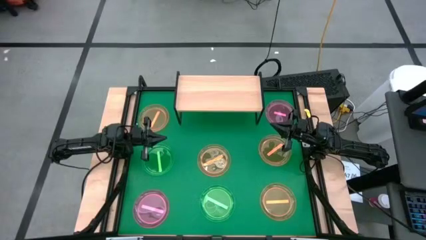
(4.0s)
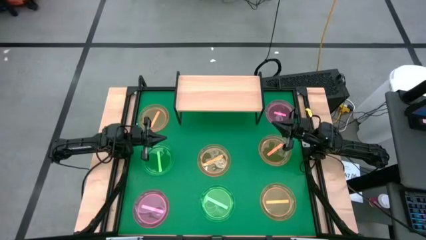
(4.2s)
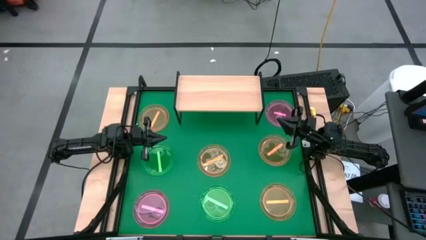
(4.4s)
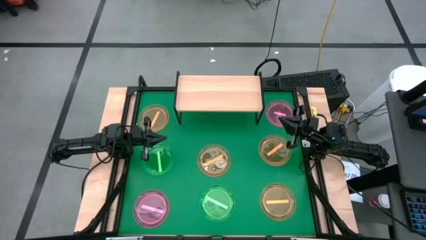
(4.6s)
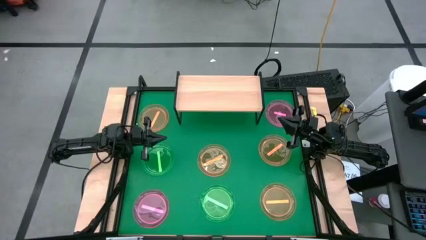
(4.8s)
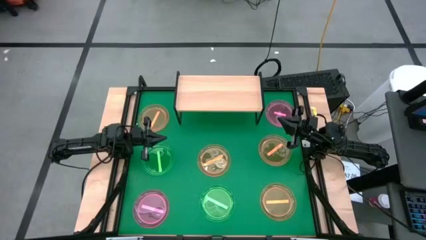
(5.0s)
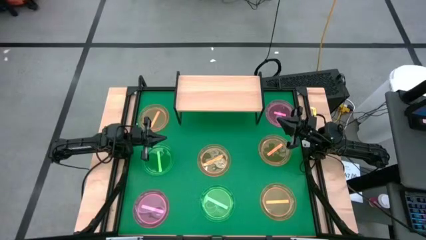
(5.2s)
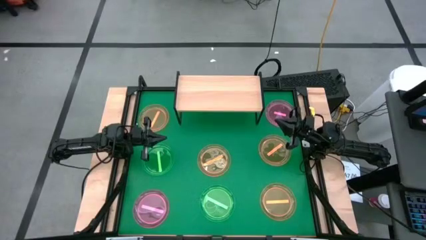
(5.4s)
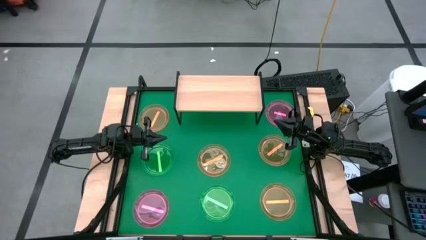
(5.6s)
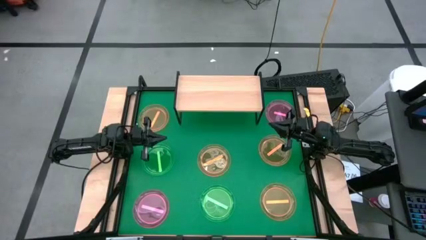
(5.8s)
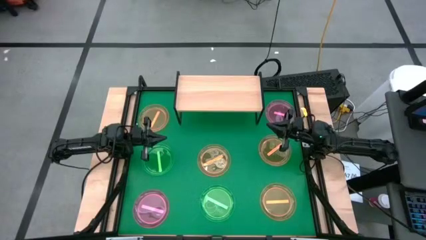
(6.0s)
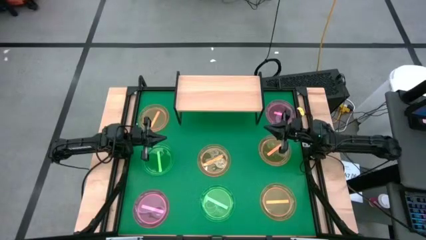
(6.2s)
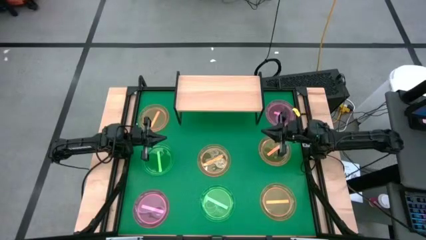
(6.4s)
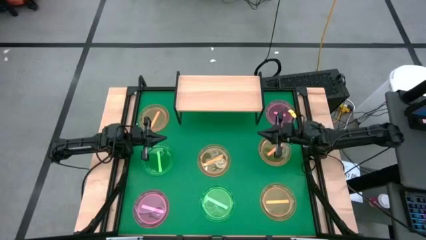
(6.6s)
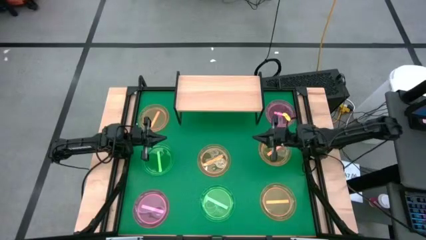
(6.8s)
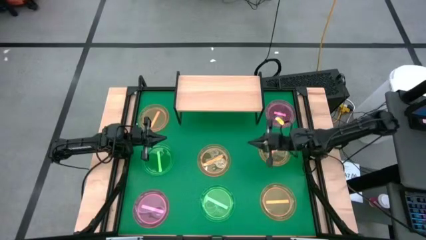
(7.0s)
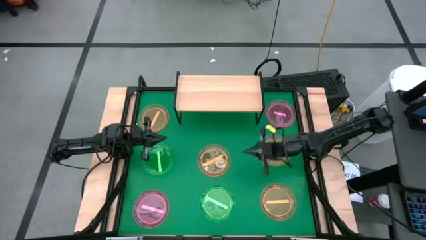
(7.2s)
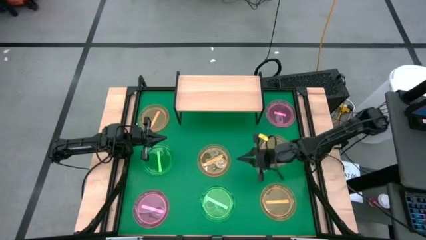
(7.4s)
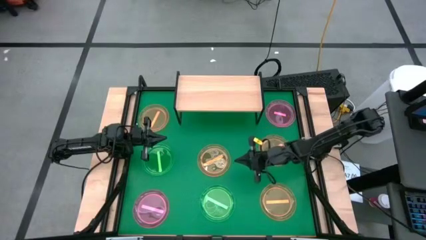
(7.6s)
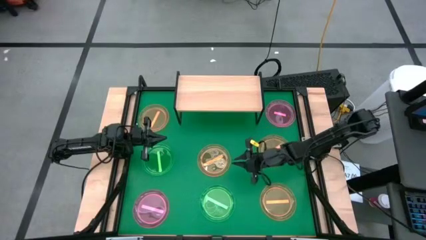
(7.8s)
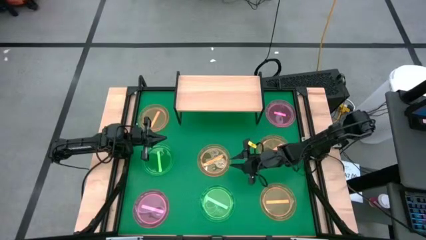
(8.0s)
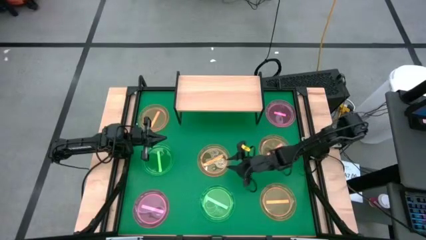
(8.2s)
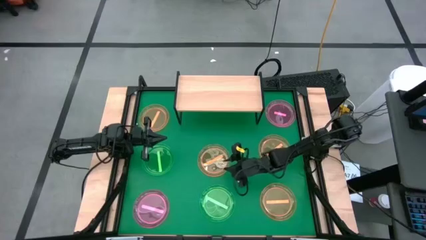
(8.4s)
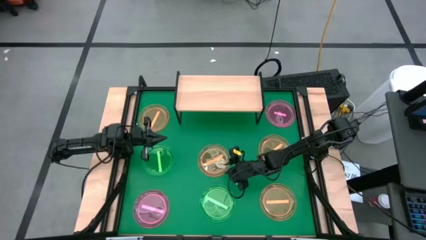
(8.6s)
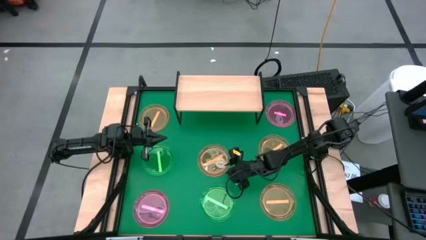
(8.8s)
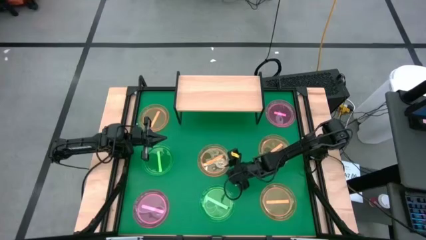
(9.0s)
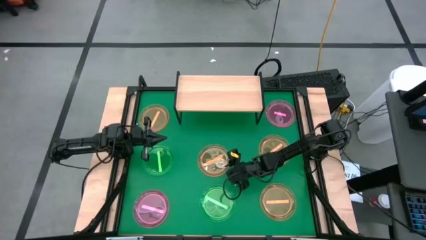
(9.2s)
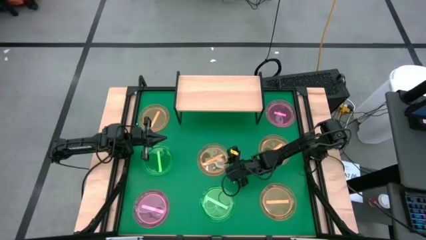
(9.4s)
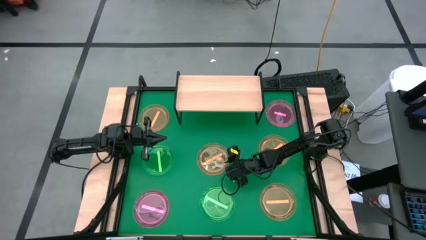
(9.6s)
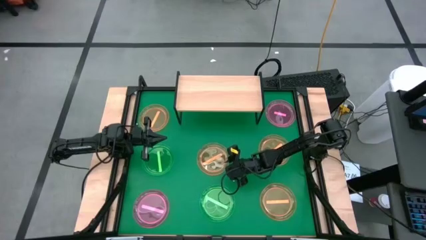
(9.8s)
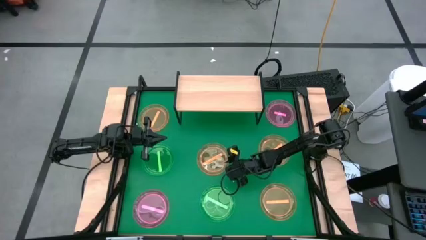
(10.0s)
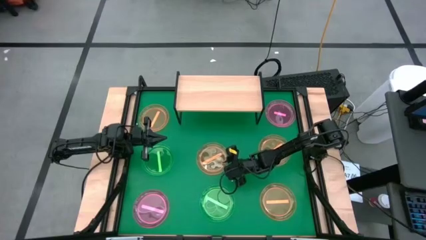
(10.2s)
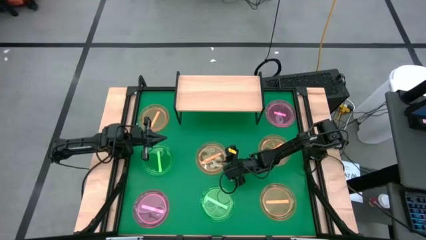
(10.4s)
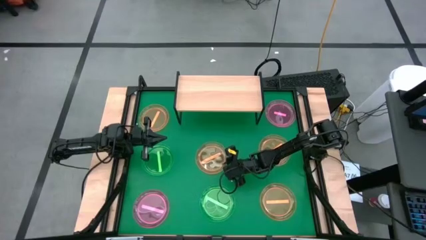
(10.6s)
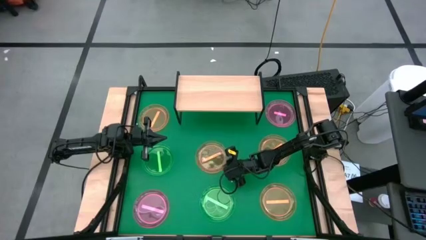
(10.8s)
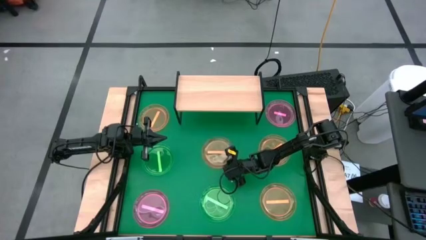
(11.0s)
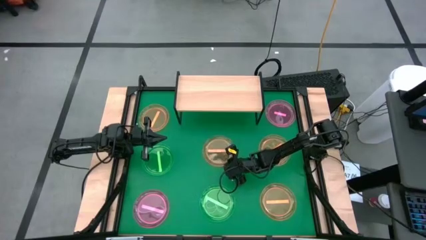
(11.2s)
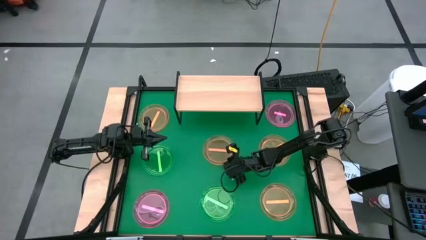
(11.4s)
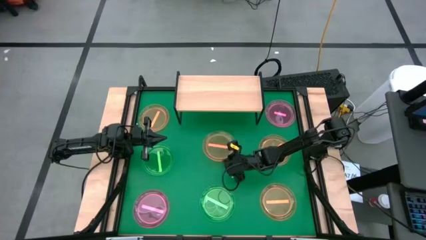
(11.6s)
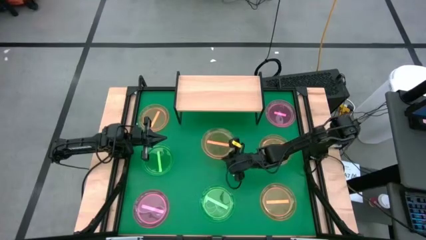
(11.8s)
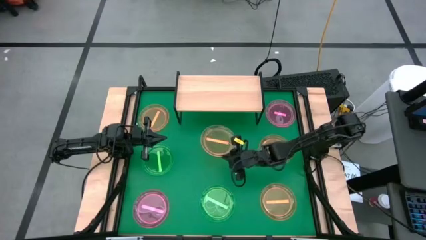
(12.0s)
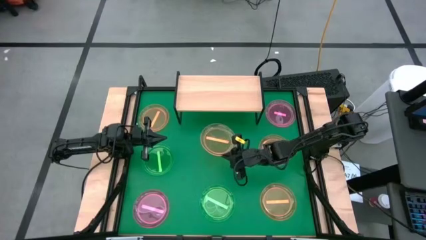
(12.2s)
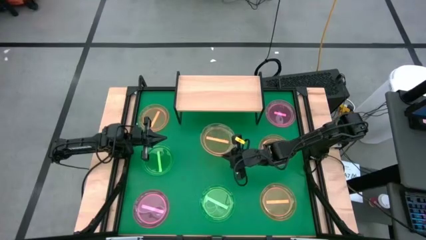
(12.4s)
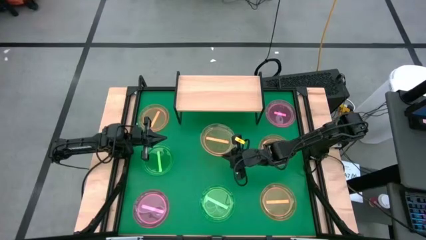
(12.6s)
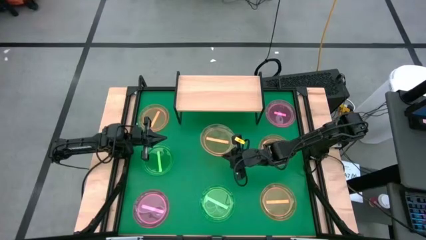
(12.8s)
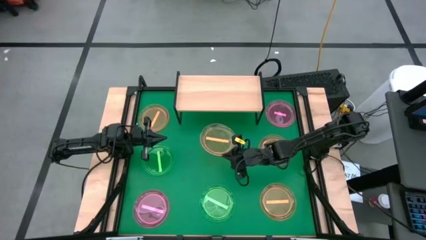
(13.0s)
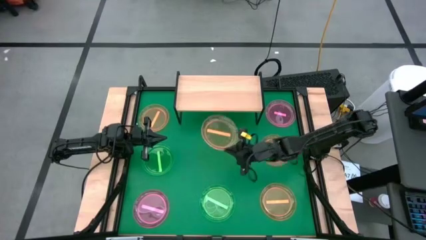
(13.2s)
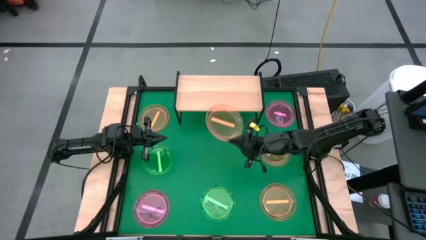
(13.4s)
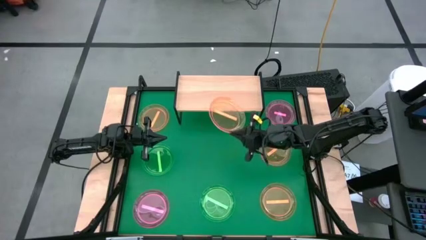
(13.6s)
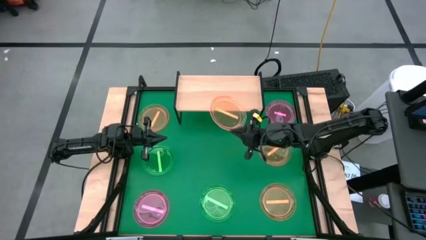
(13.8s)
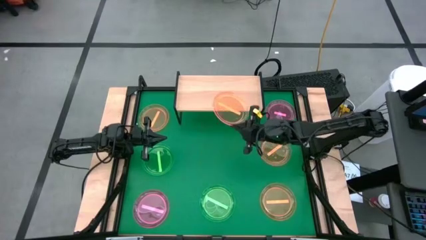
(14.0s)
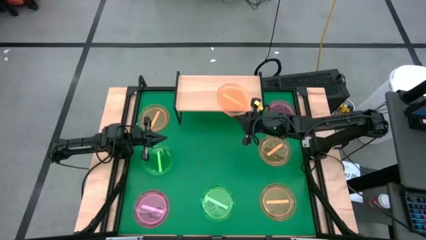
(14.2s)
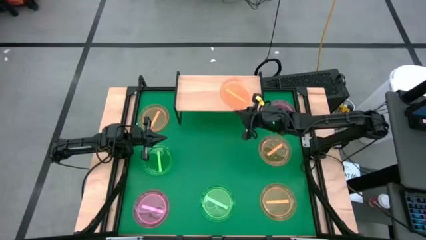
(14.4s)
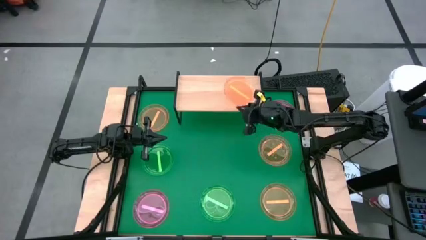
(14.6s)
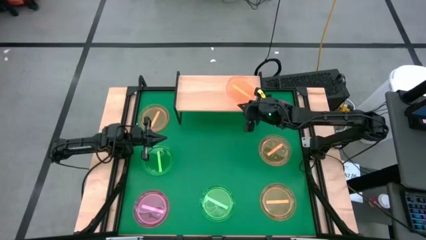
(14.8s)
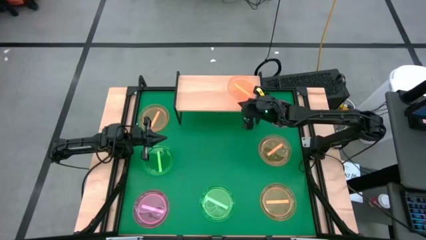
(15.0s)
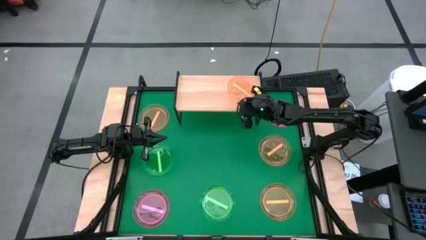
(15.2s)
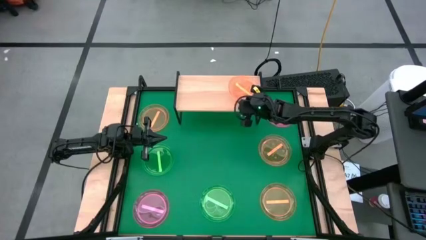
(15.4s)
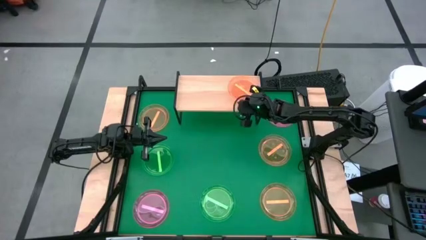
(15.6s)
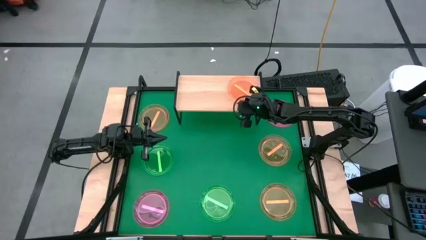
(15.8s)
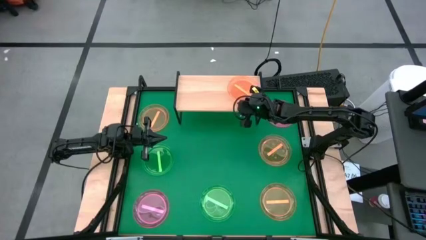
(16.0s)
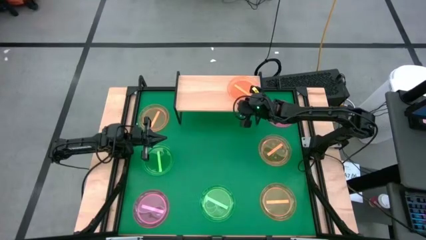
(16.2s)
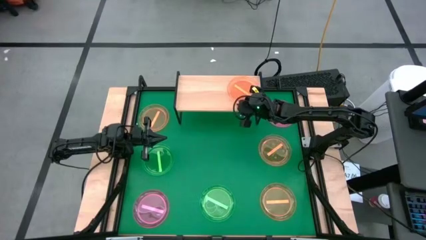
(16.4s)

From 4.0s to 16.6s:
Task: Place and stack plates onto a shelf
Put the orange plate on the shelf
